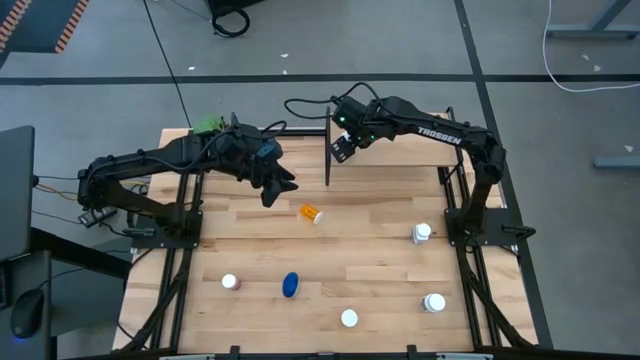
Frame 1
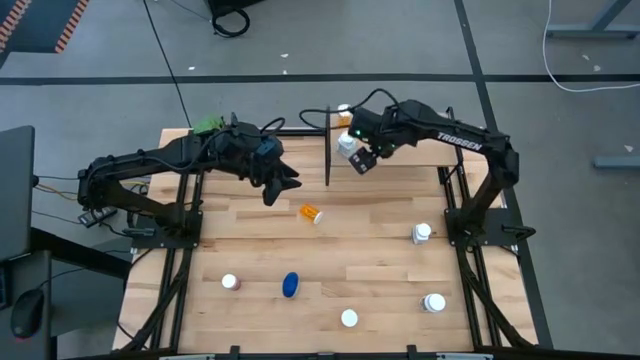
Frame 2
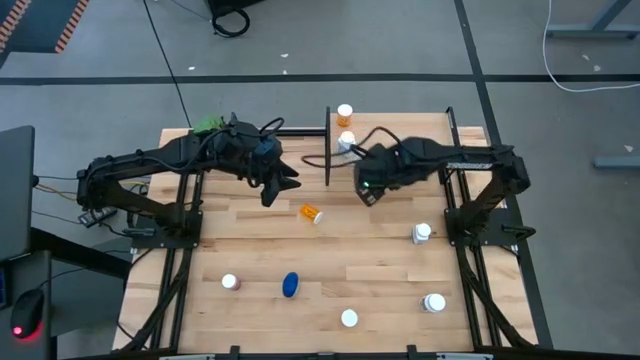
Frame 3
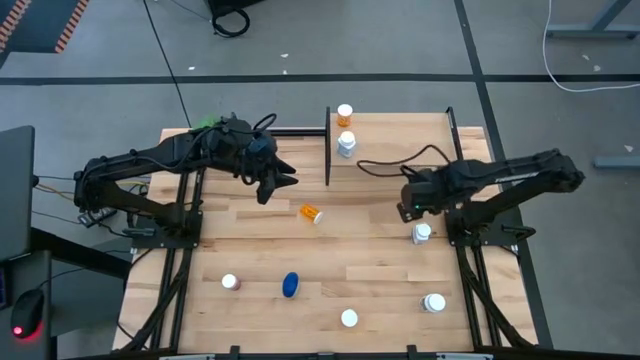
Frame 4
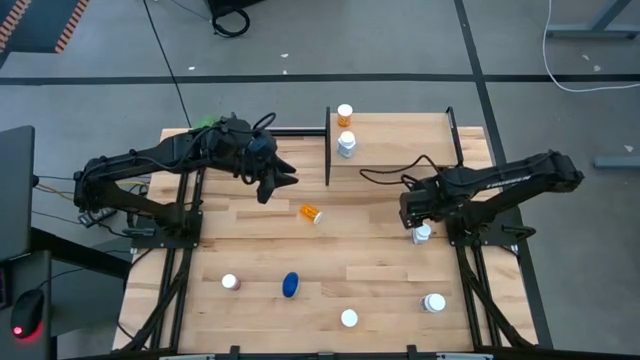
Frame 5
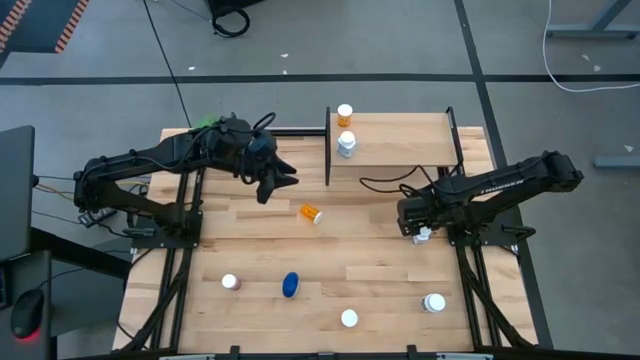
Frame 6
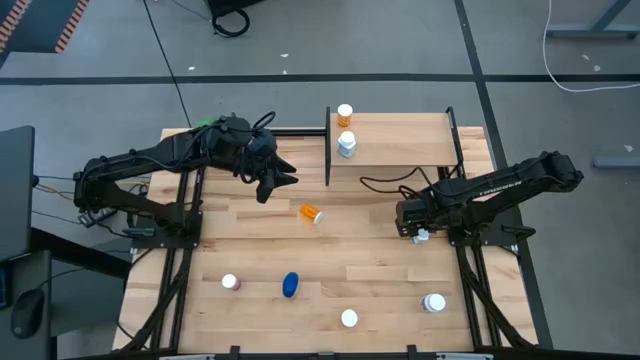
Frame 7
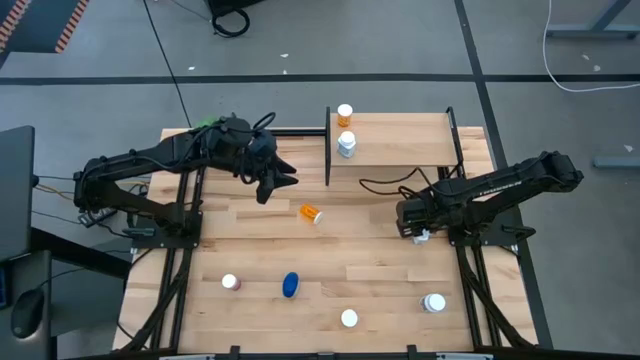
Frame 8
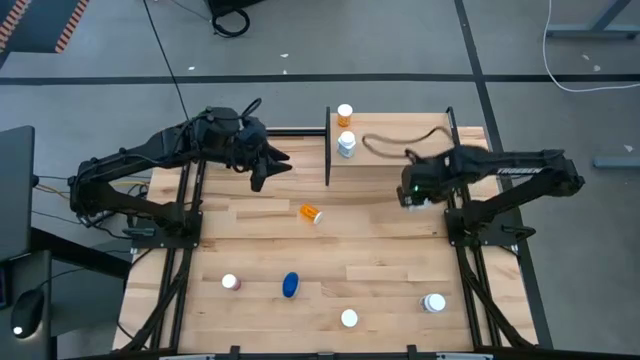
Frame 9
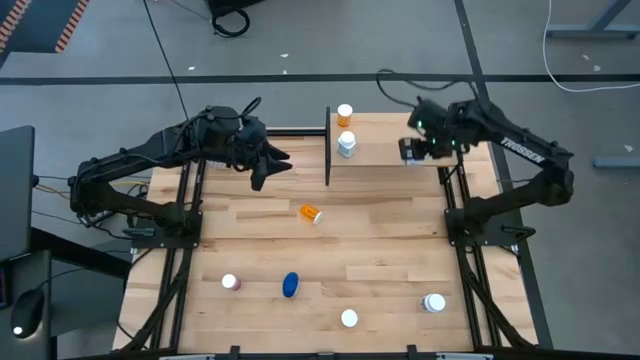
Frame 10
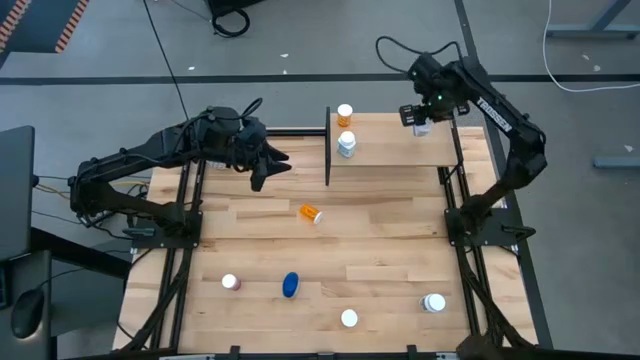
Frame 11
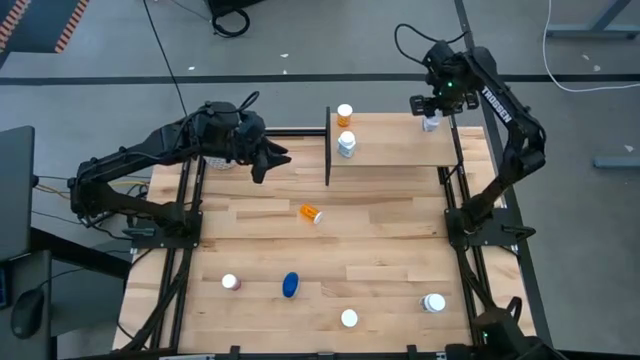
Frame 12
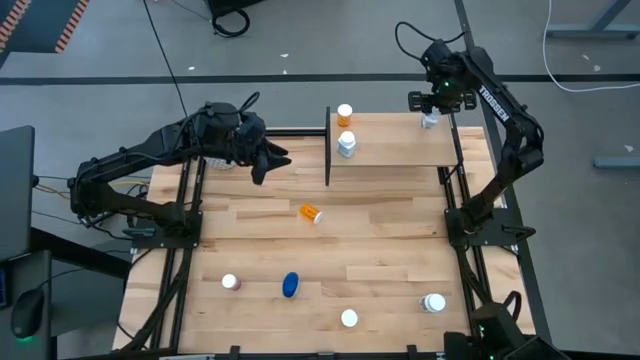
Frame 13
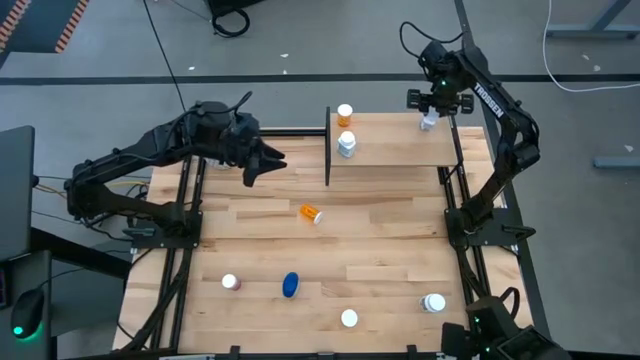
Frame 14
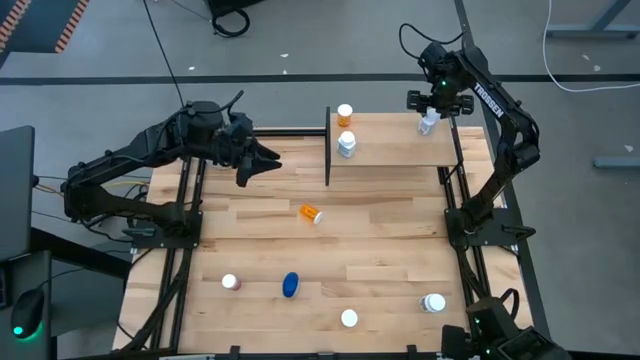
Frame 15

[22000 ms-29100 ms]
Task: Pick and place medicine bottles onto shelf by color
Put the white blue pill bottle on the shelf

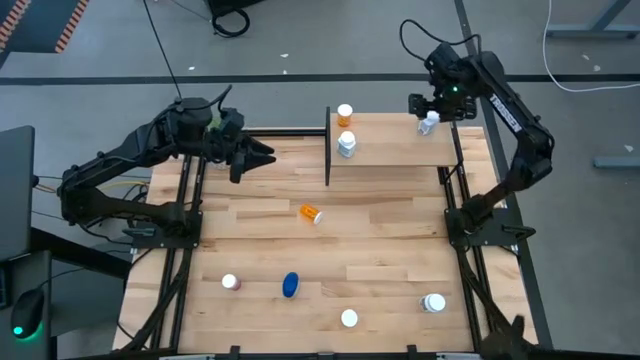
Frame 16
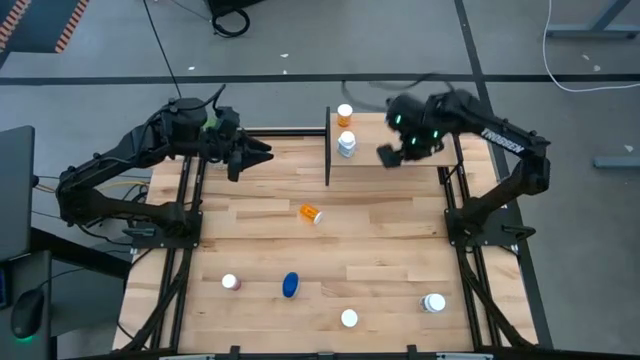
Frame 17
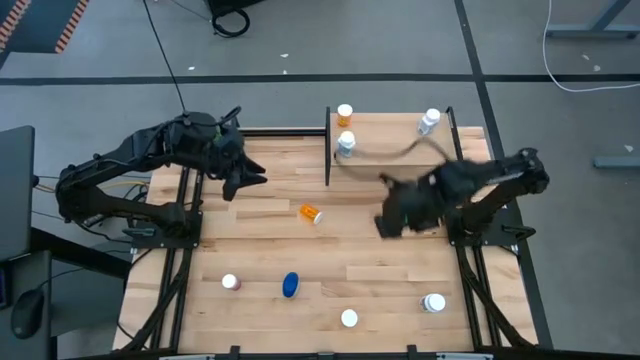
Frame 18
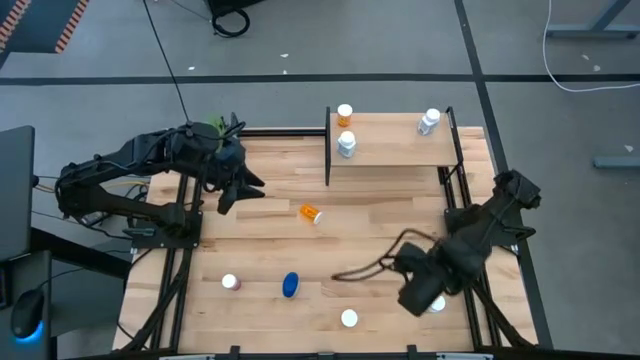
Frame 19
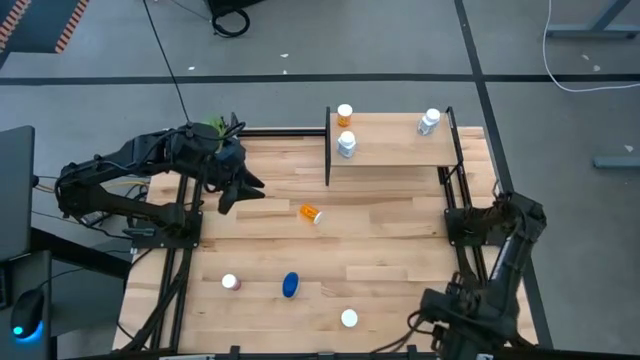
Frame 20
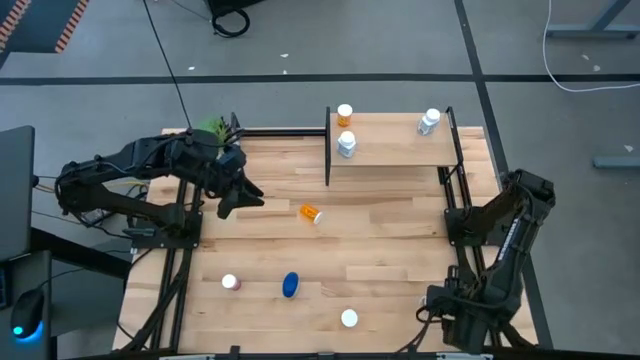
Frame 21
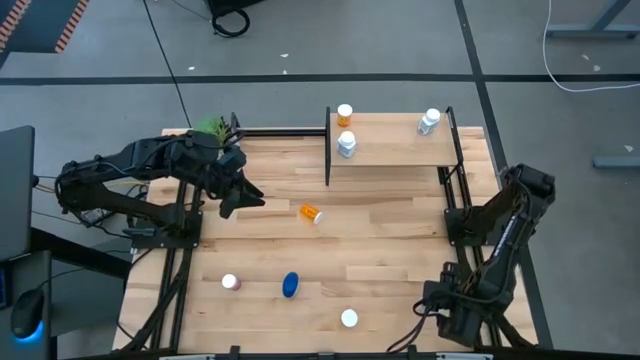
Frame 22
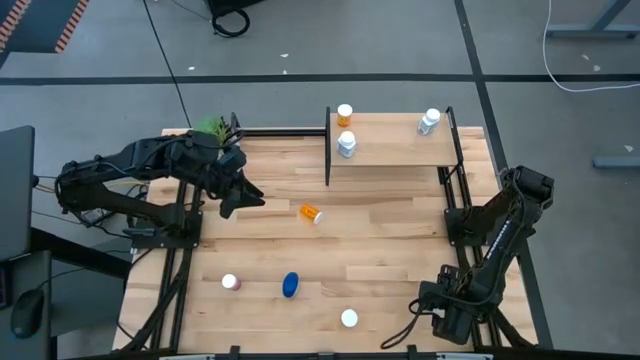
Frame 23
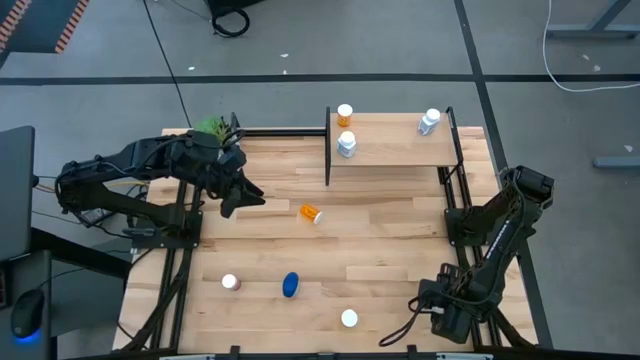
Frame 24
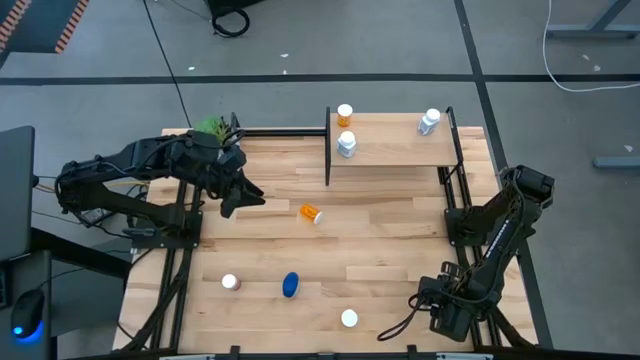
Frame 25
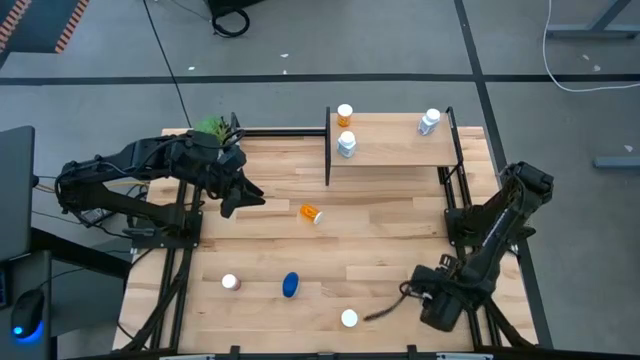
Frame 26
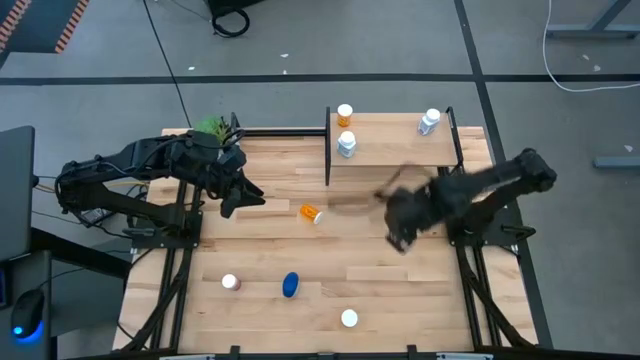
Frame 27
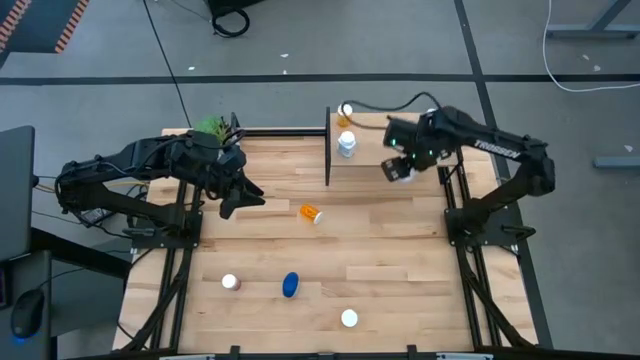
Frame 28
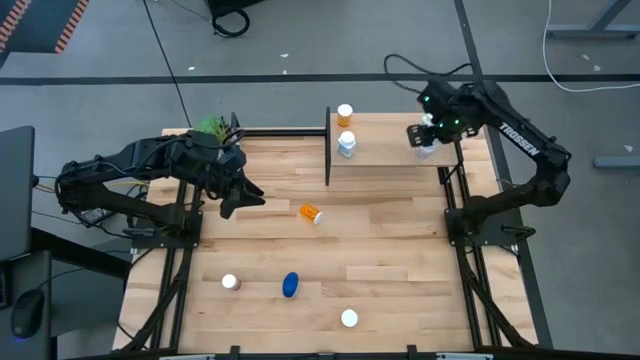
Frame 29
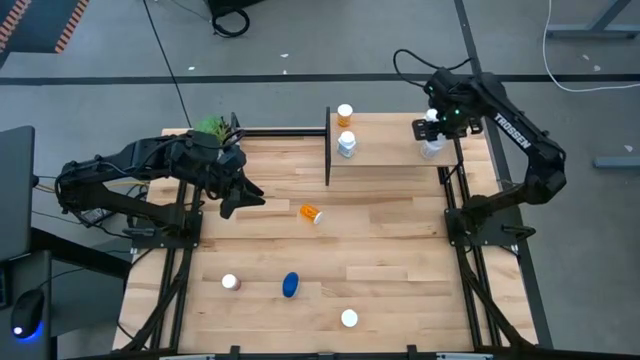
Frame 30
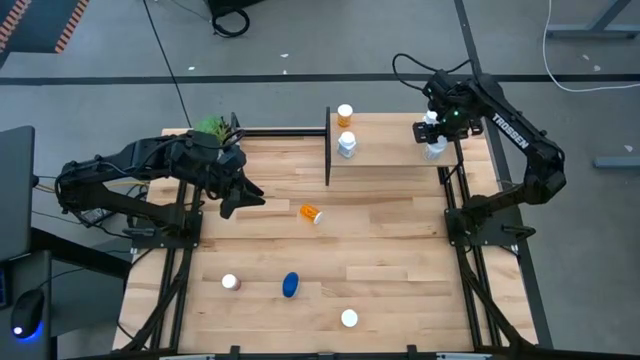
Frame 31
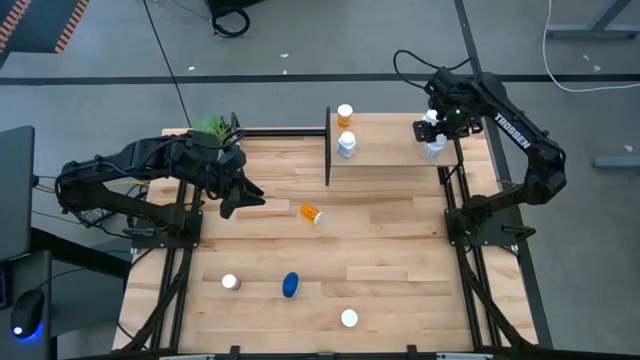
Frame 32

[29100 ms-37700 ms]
Put the white green pill bottle on the shelf aligned with the white blue pill bottle

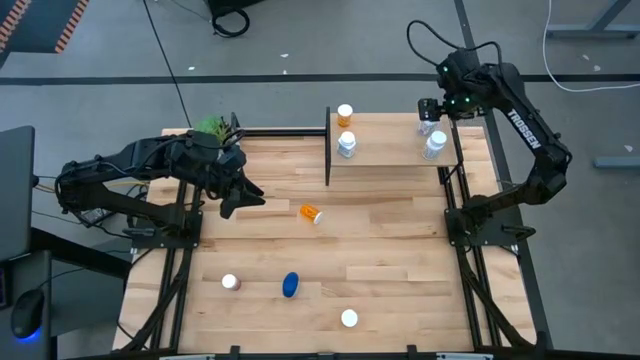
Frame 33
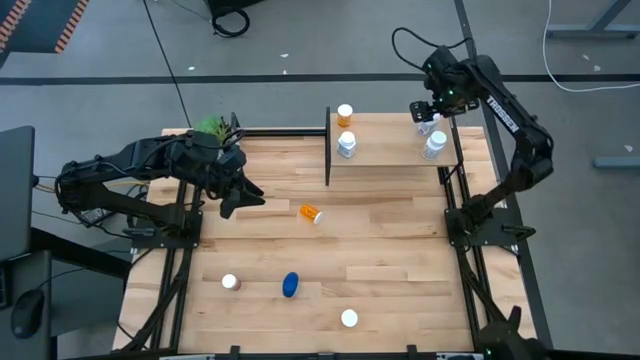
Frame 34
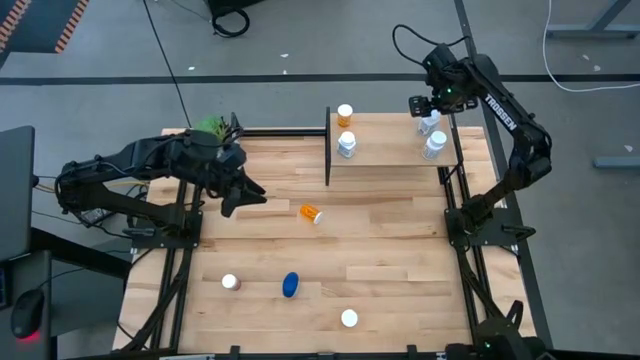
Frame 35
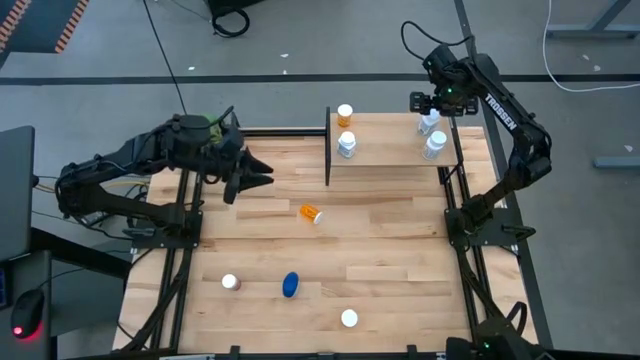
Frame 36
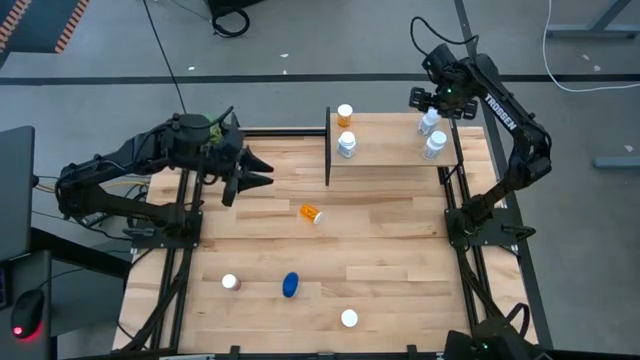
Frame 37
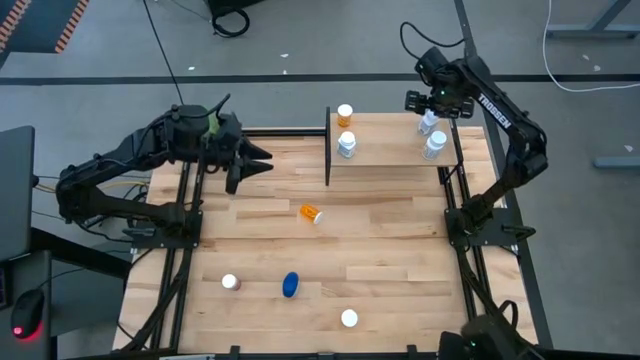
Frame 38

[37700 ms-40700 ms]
Adjust the white blue pill bottle on the shelf

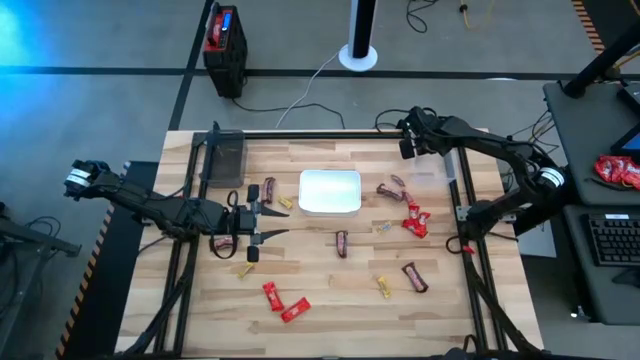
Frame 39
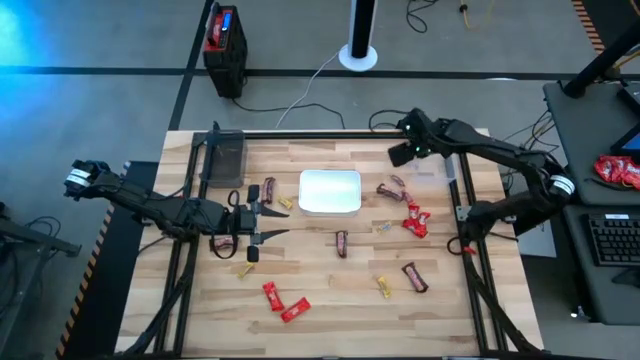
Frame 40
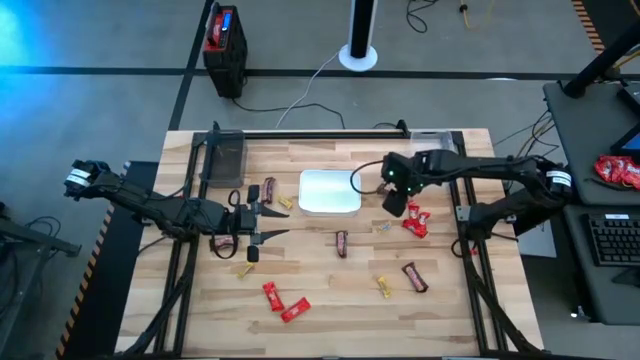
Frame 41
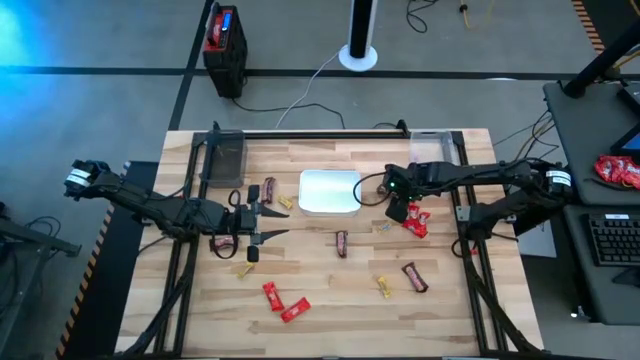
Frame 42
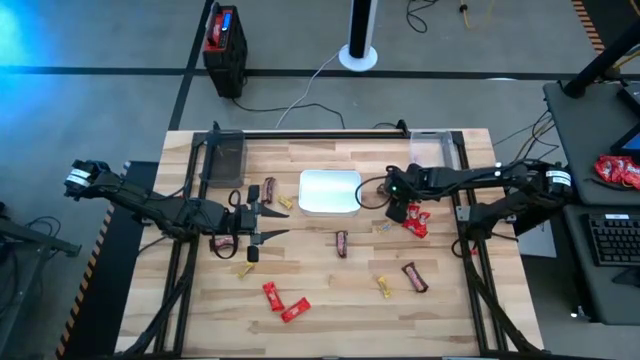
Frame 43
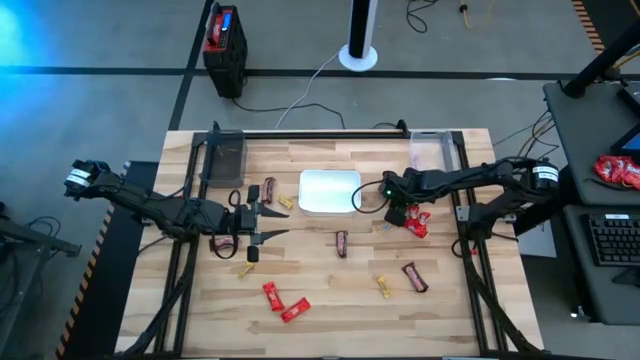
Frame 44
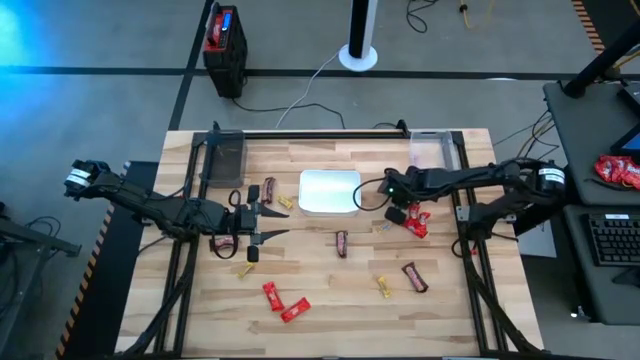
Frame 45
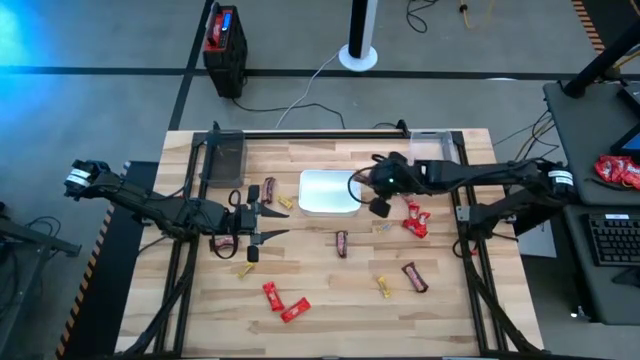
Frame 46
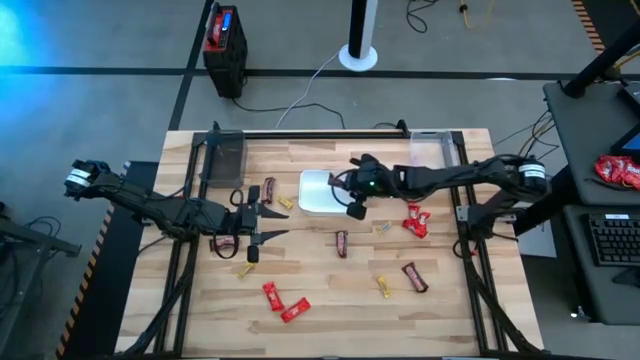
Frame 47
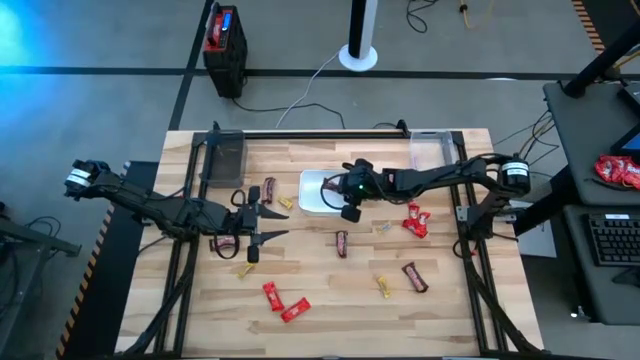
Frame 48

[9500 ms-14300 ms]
Task: Sort candy by brand, put in halloween buckets
Put the brown chocolate bar into the white bin
